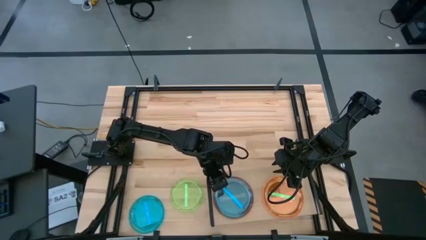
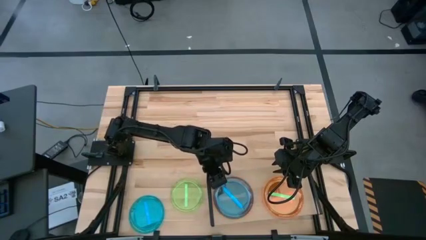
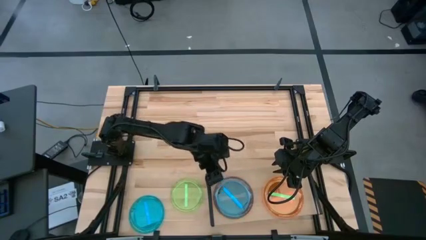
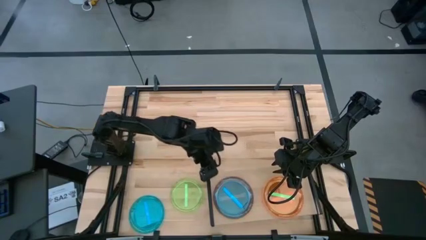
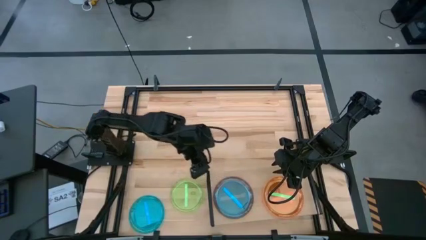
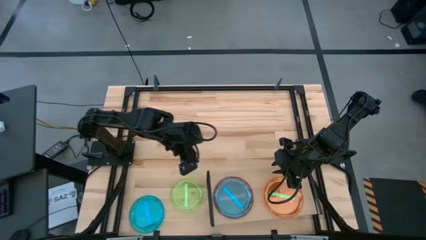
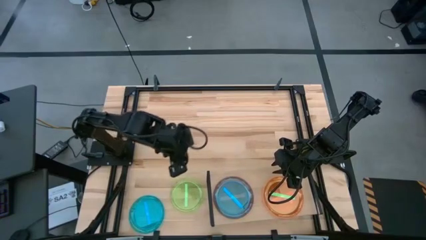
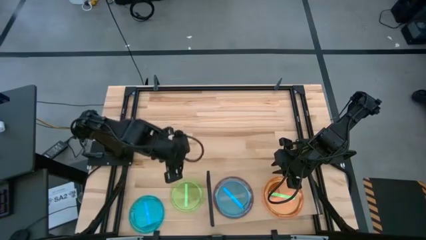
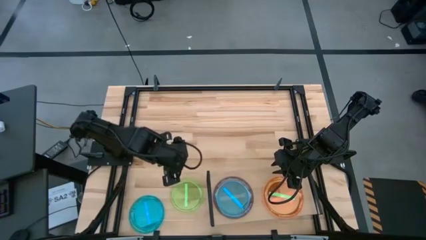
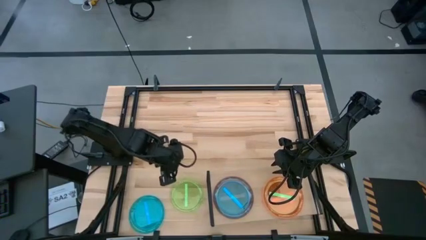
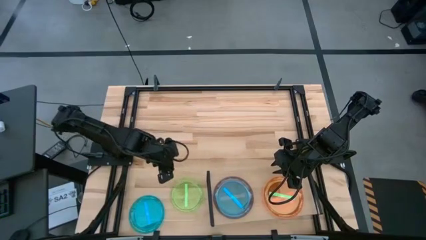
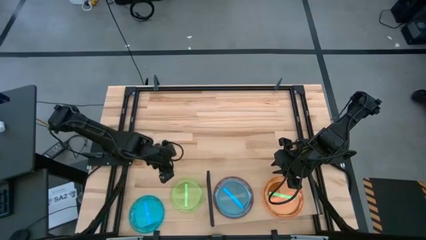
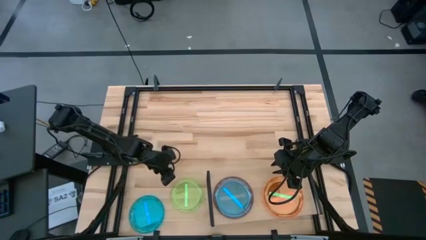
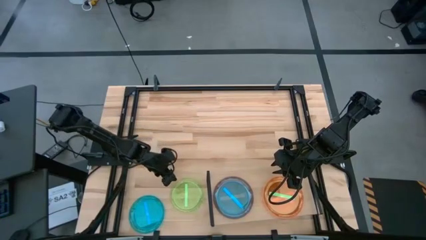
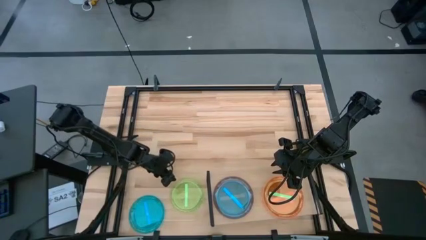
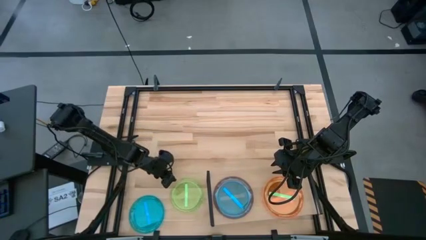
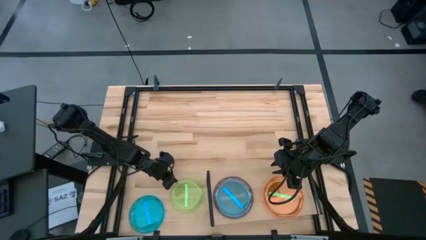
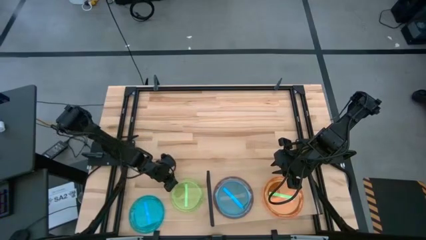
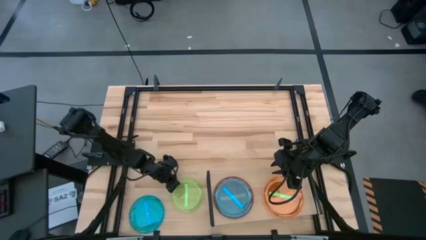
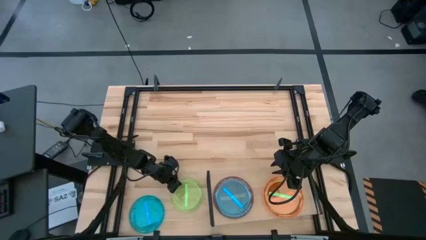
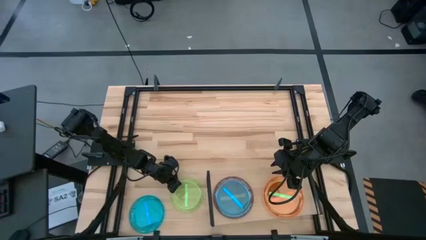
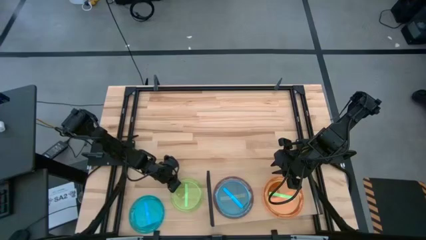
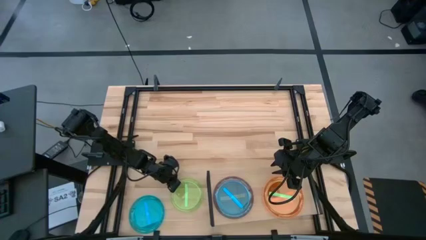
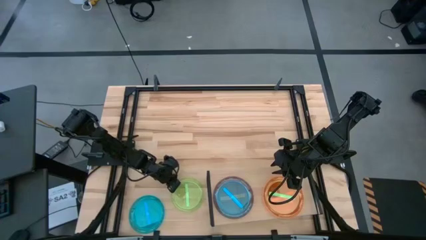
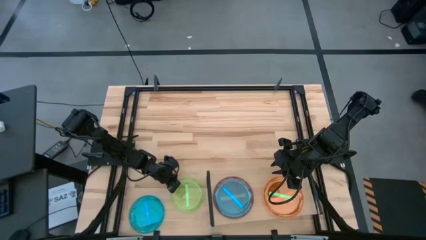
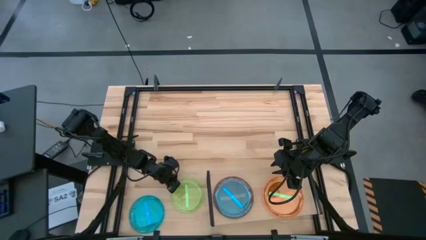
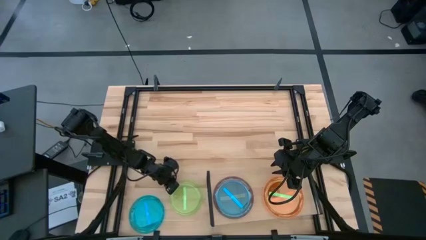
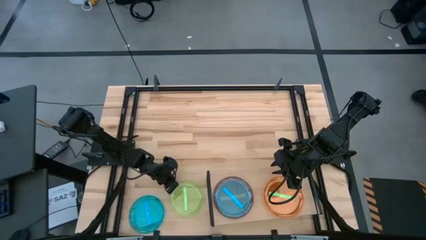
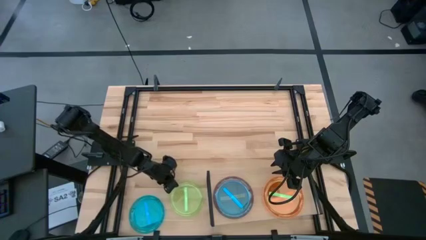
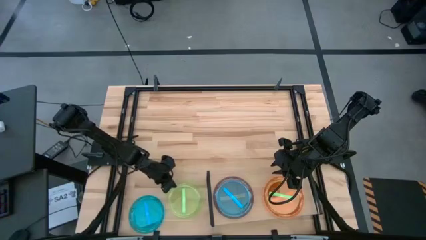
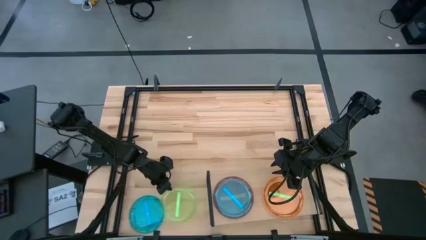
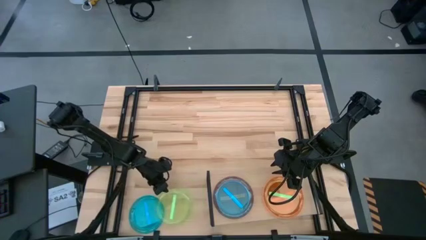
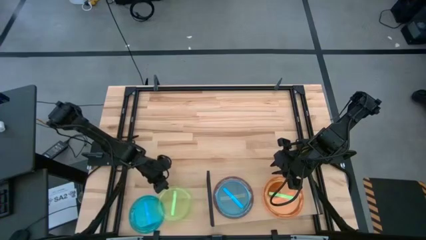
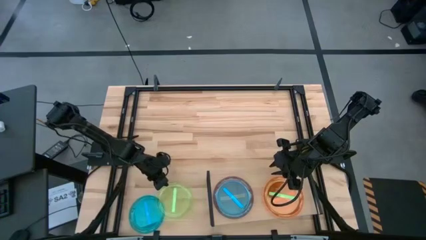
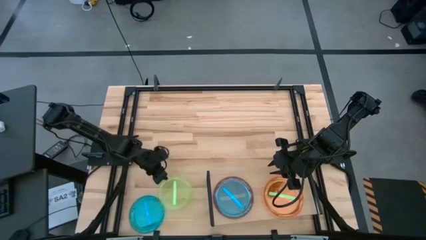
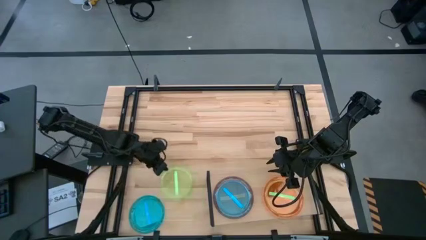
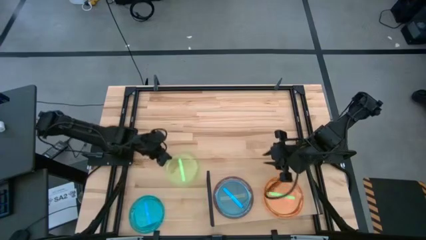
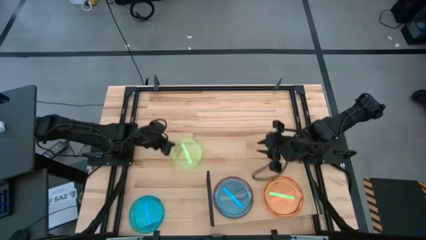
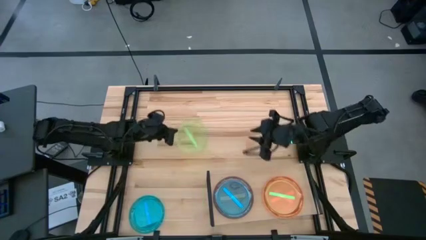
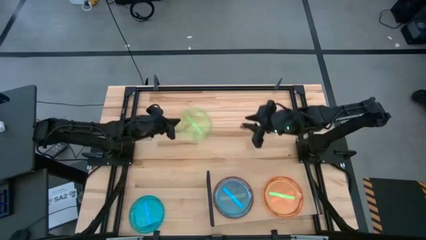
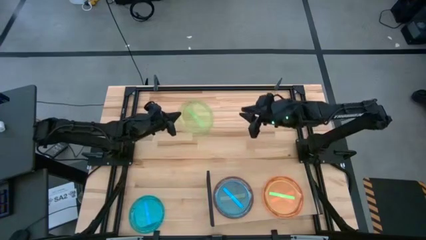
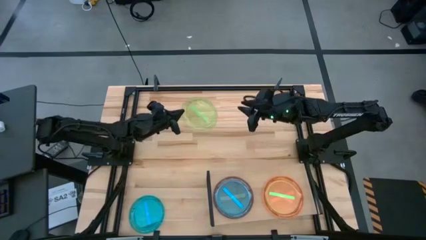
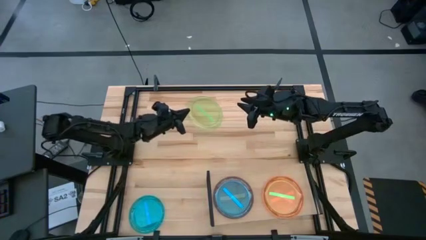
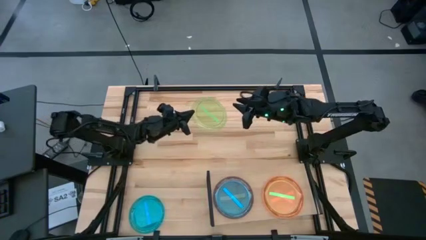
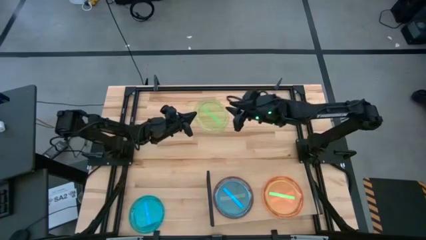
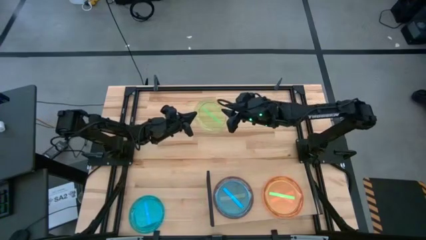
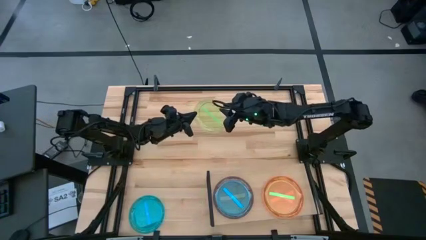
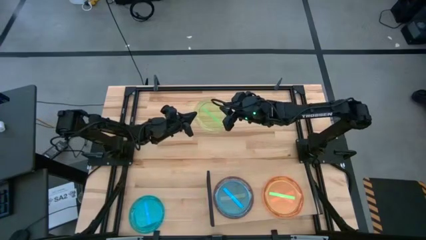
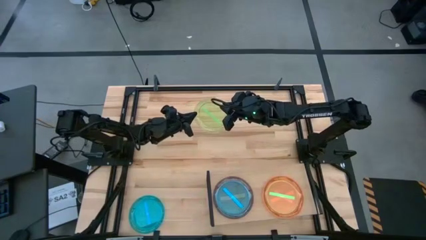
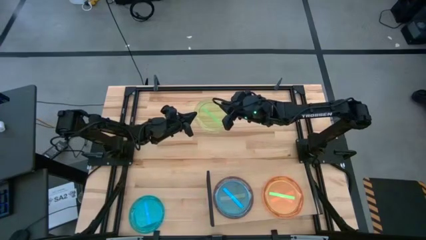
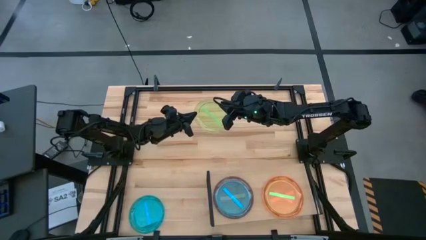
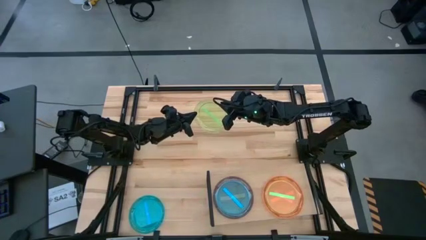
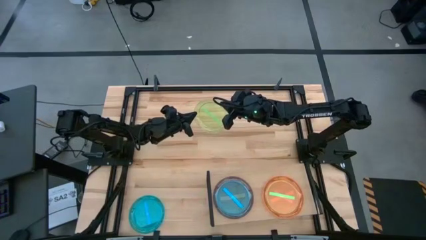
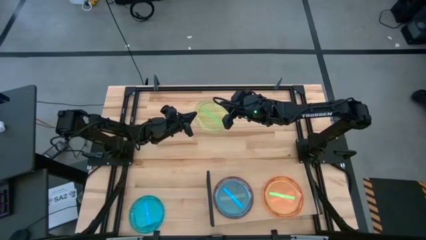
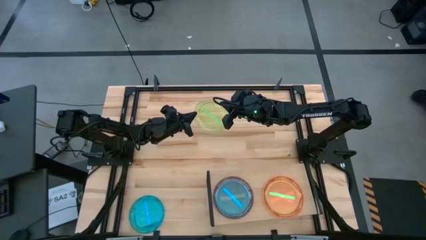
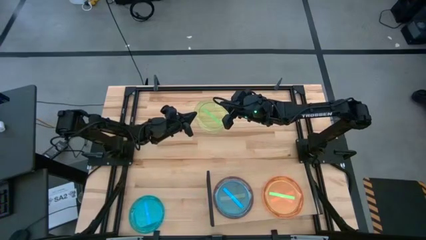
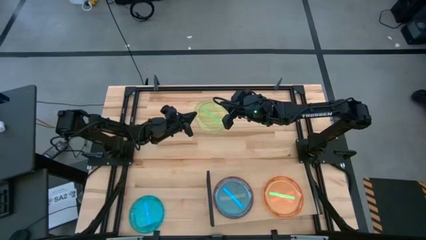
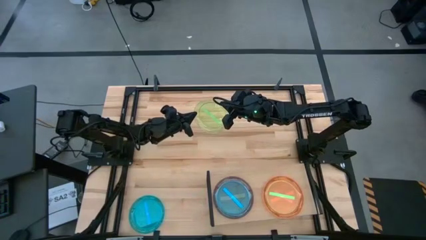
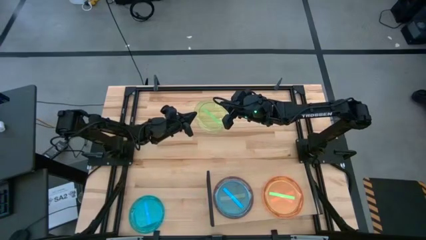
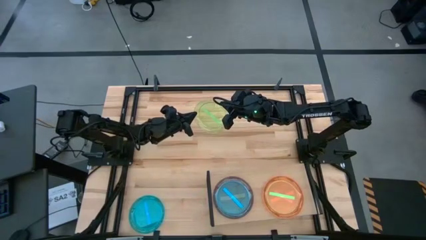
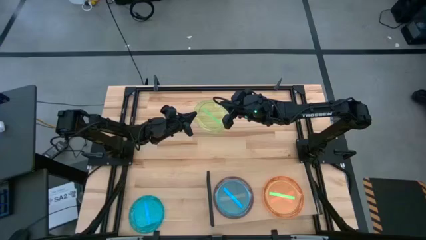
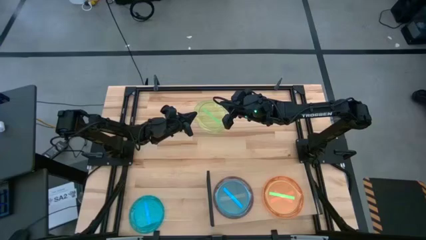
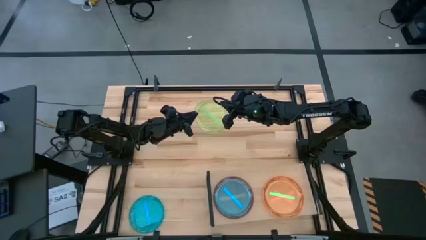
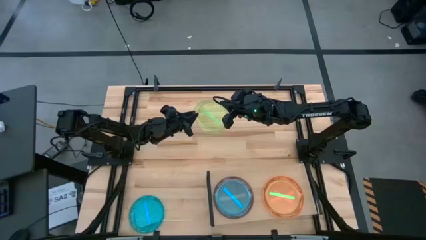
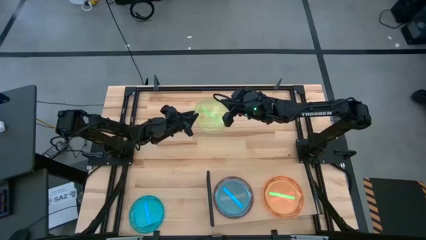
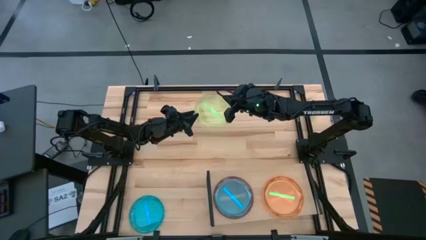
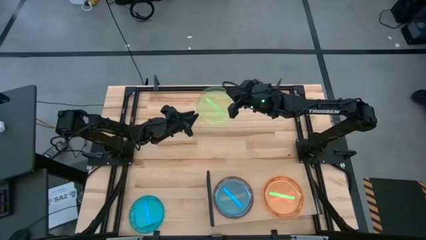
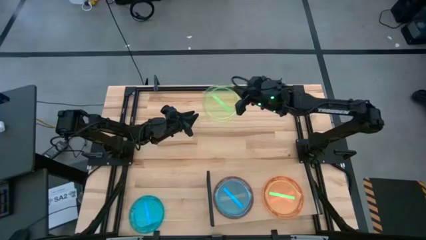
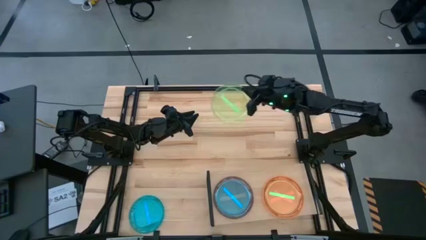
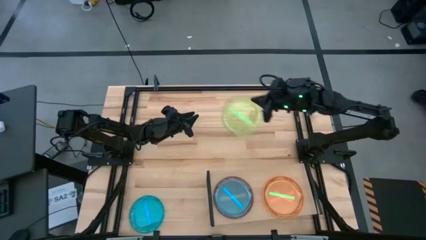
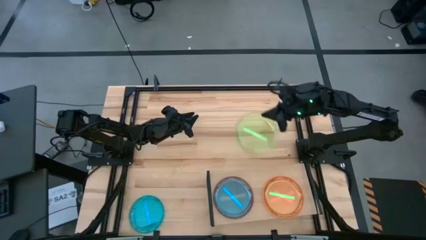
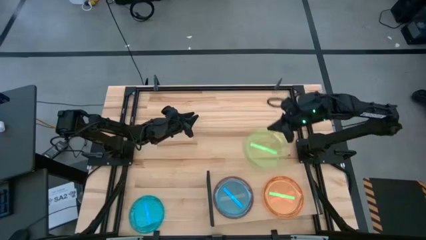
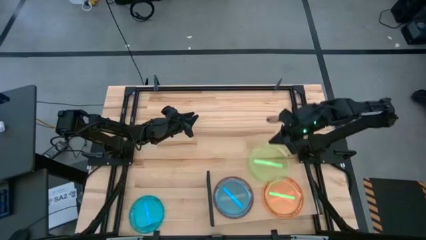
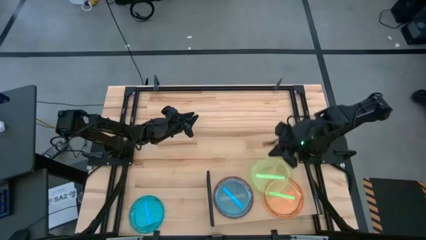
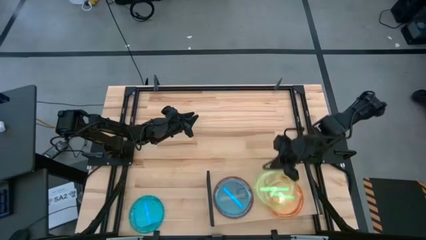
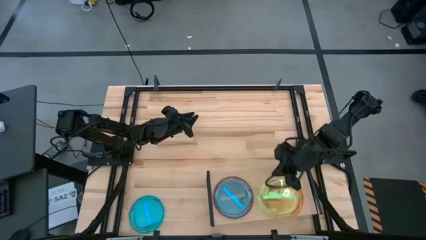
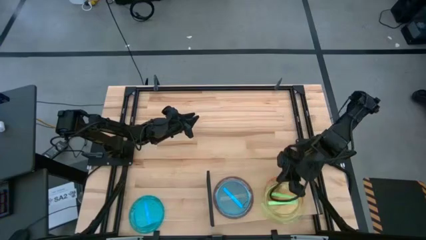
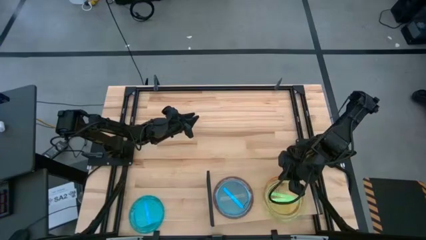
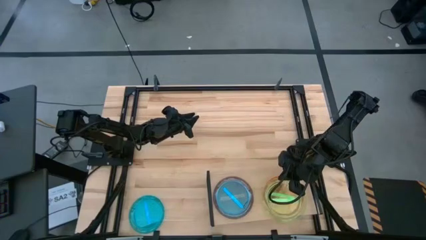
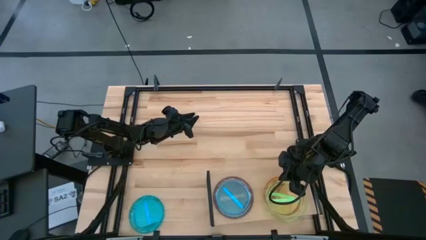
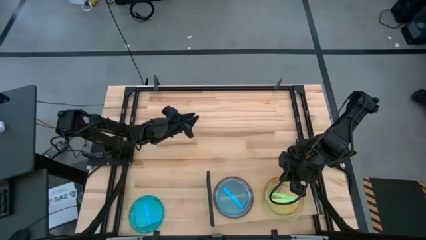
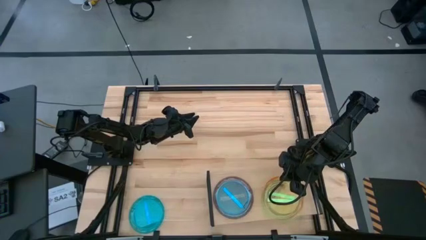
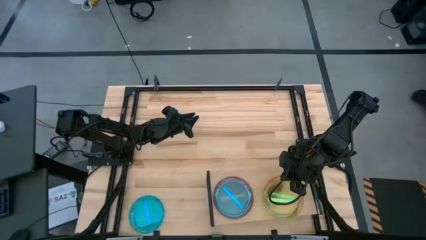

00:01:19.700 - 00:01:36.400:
Task: Place and stack plates onto a shelf
Stack the green plate on the orange plates on the shelf
